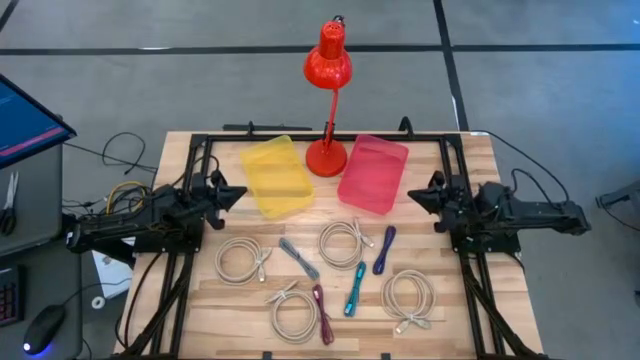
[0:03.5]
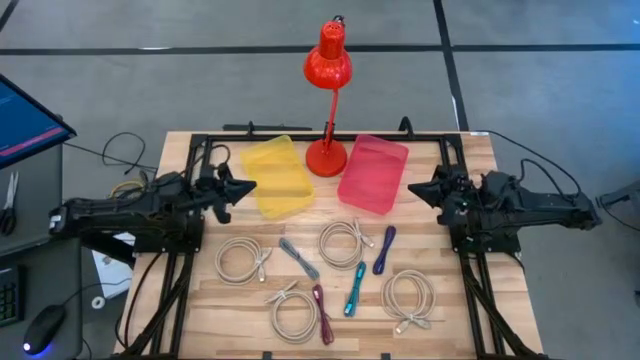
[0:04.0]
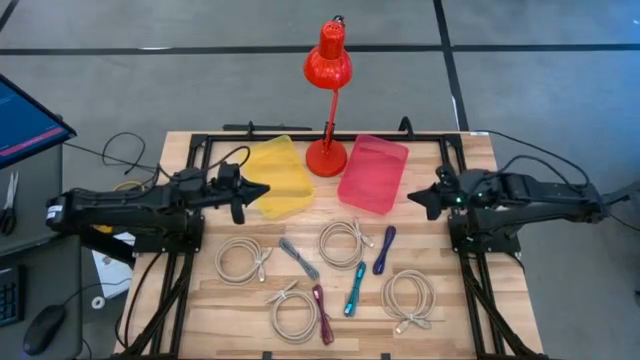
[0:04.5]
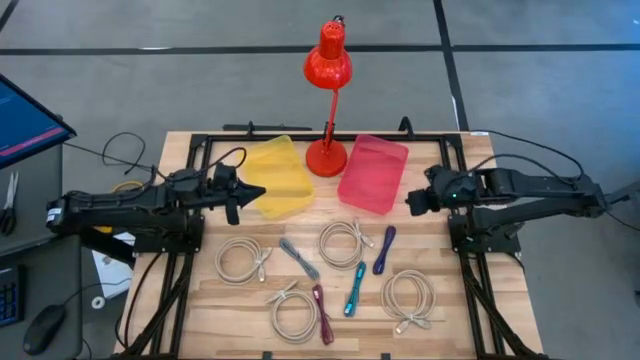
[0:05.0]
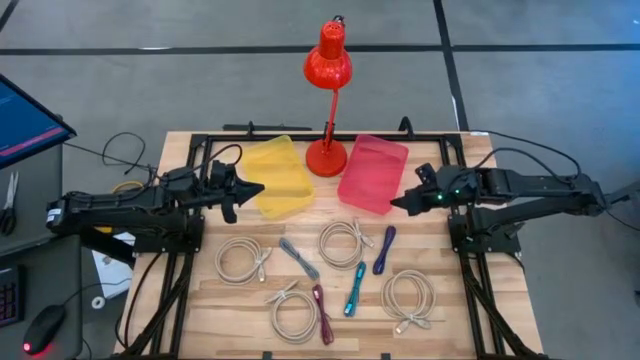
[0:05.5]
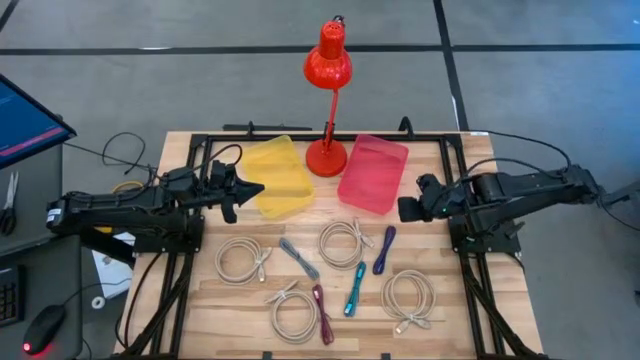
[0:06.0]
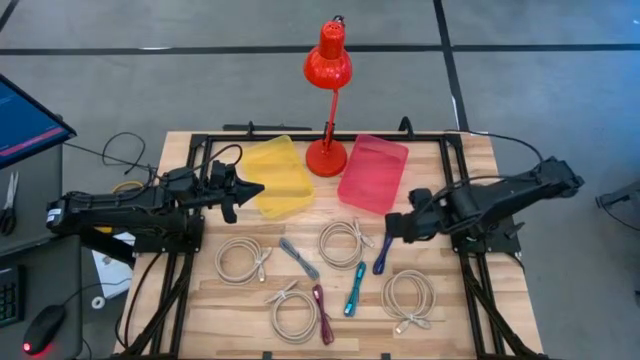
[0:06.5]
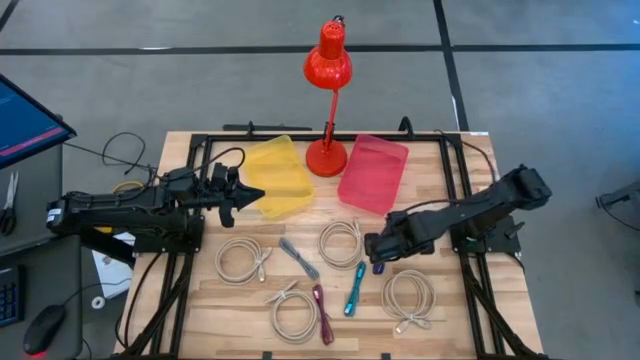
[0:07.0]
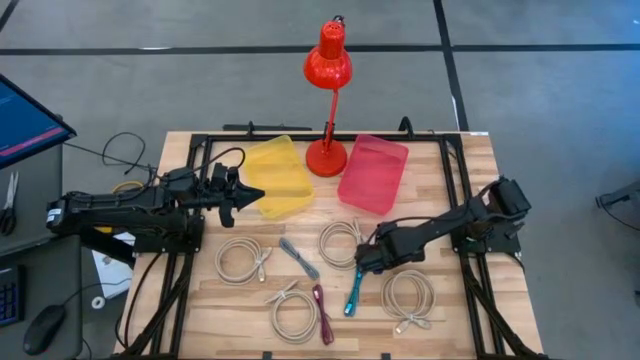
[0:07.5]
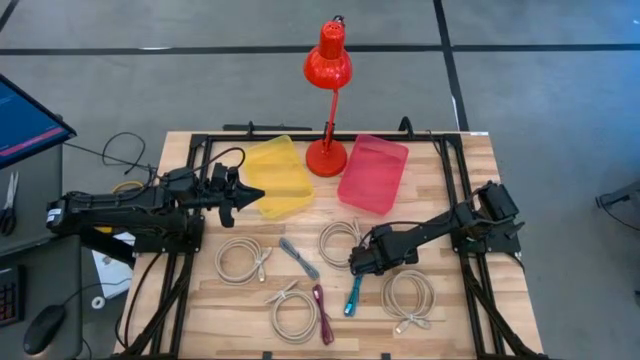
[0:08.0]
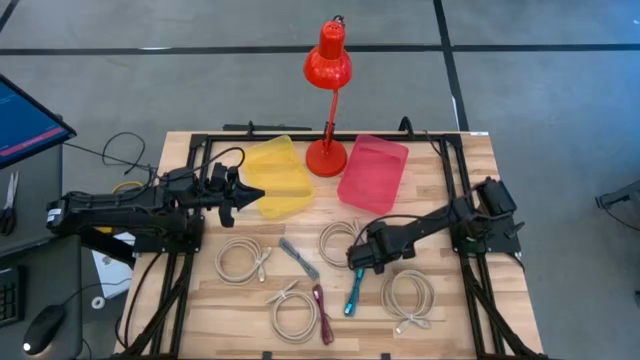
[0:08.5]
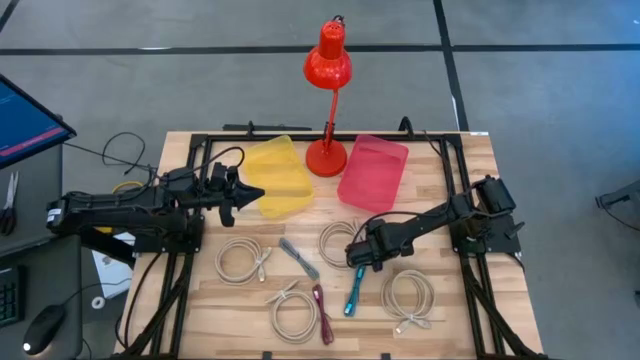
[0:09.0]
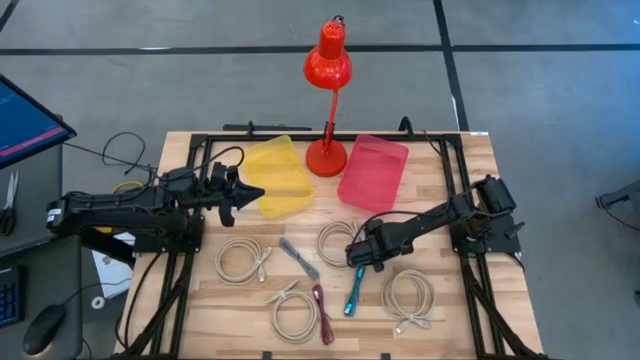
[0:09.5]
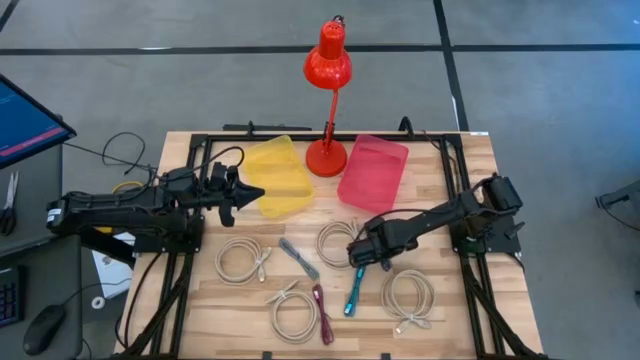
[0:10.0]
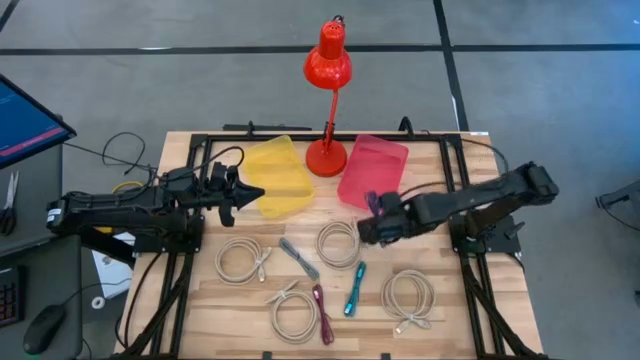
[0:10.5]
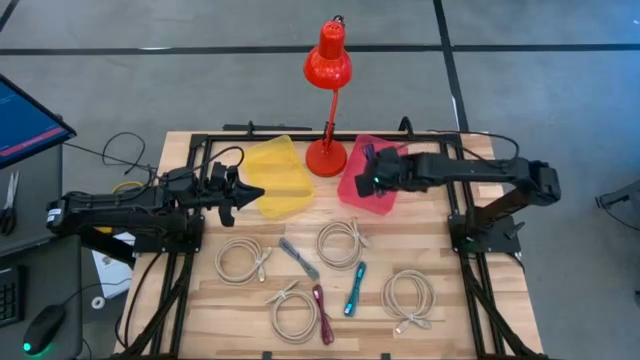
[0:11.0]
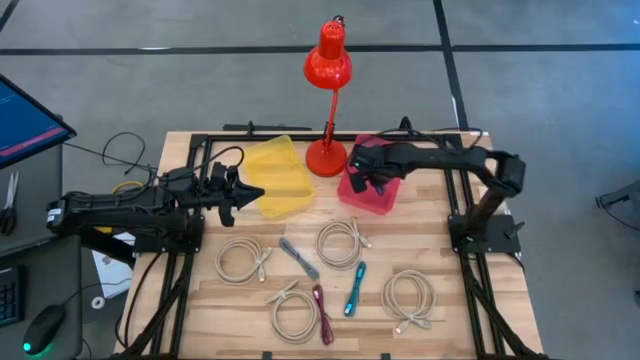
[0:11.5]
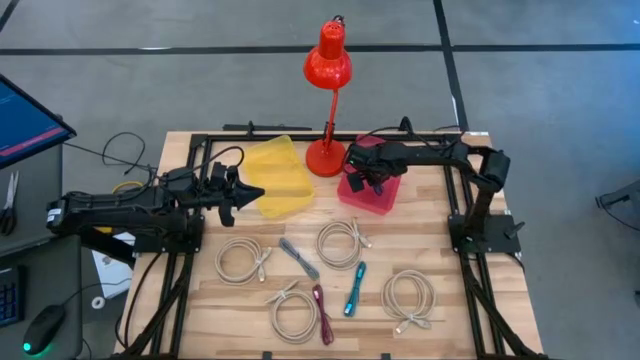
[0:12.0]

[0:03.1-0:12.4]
Task: Pick & Place USB Port
Put the black and violet charger cable into the pink bin

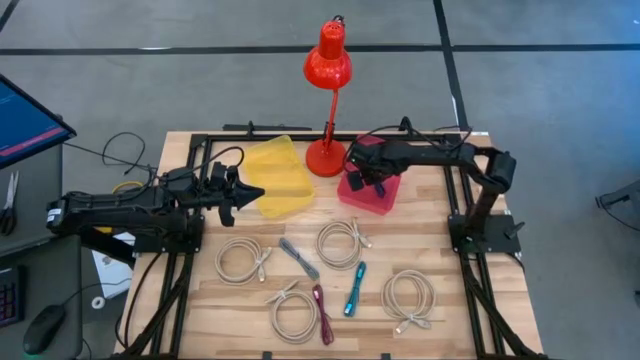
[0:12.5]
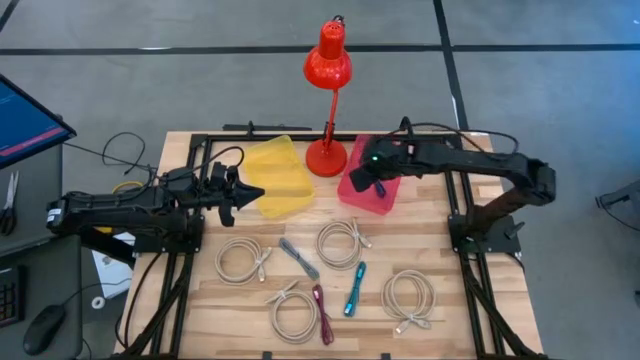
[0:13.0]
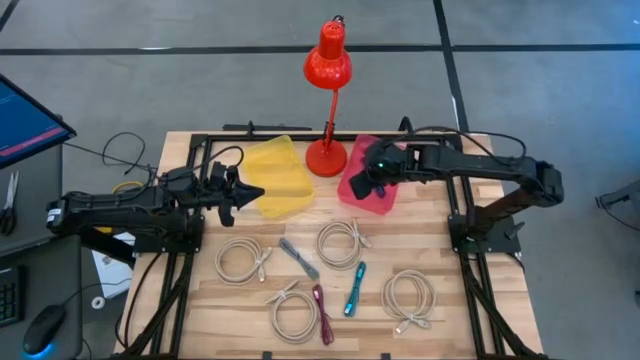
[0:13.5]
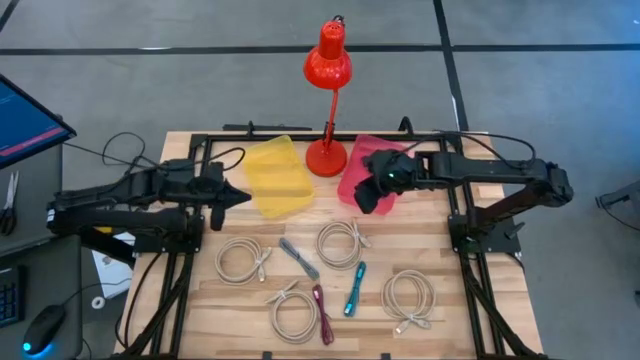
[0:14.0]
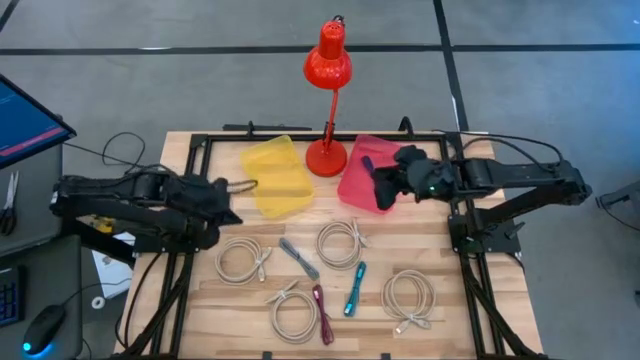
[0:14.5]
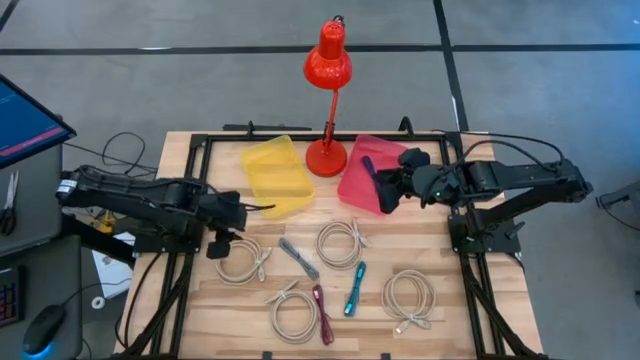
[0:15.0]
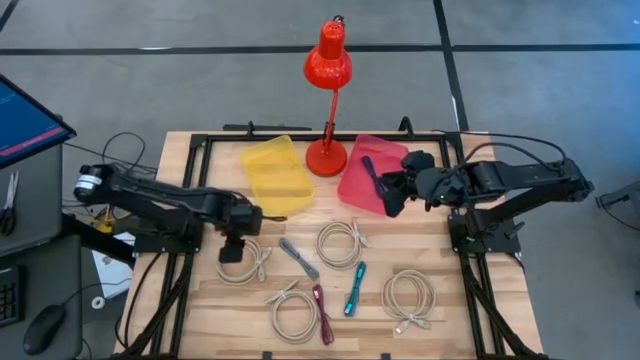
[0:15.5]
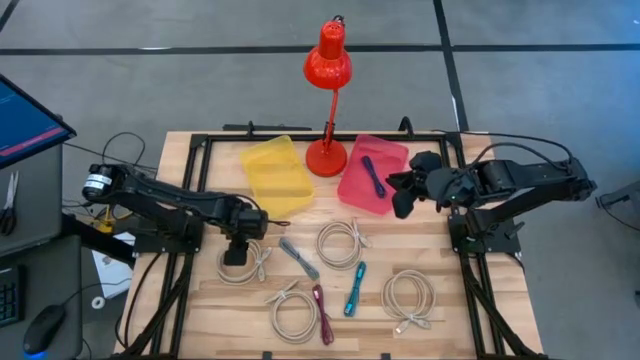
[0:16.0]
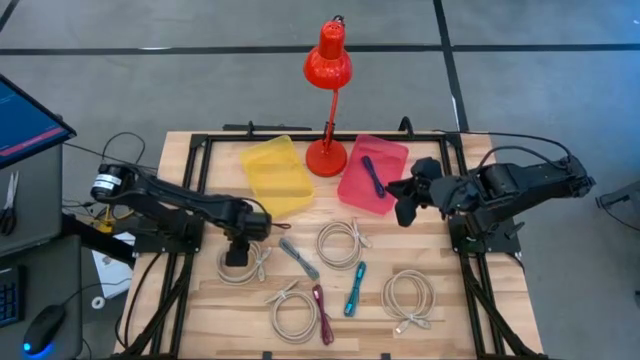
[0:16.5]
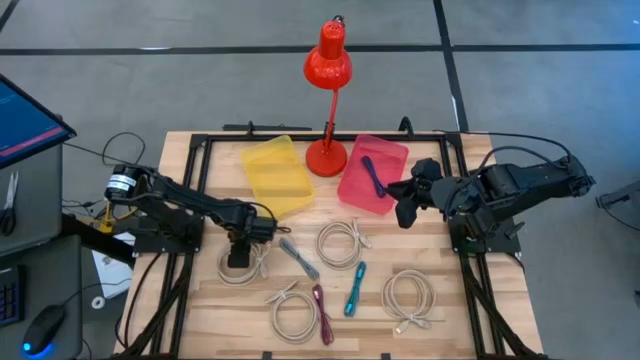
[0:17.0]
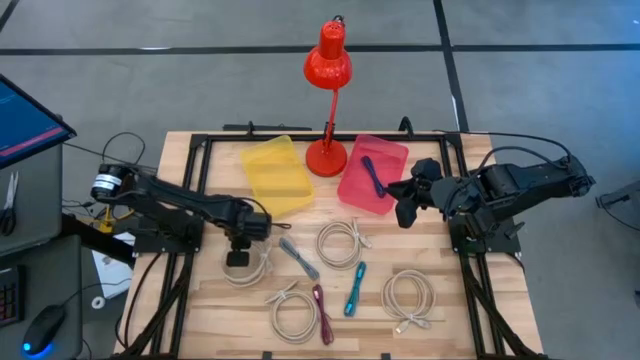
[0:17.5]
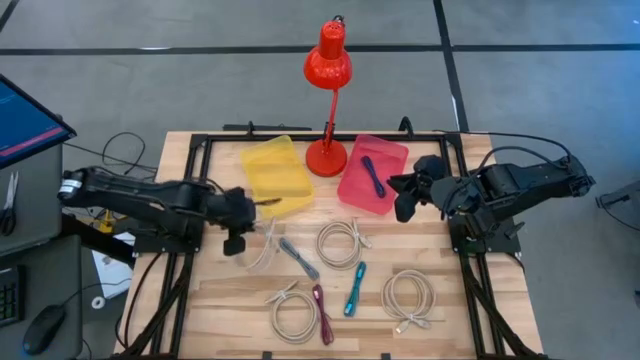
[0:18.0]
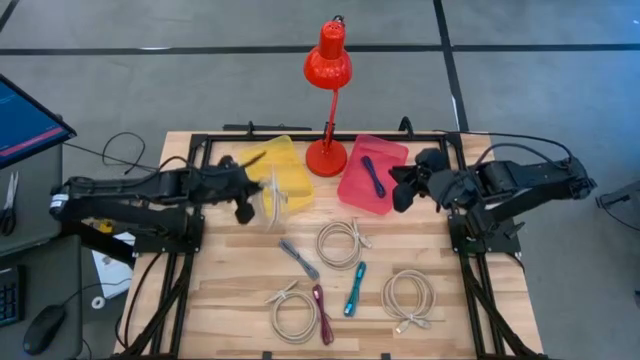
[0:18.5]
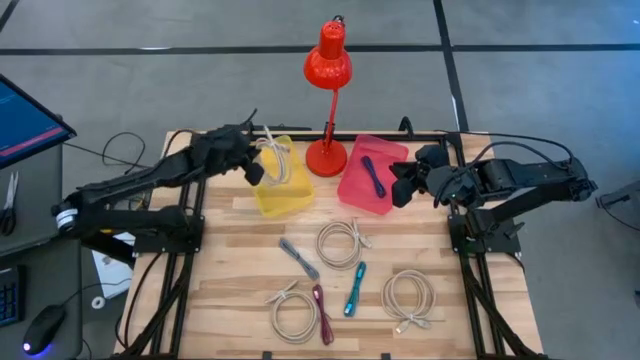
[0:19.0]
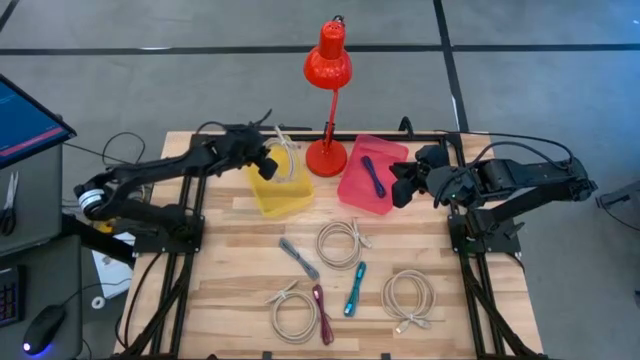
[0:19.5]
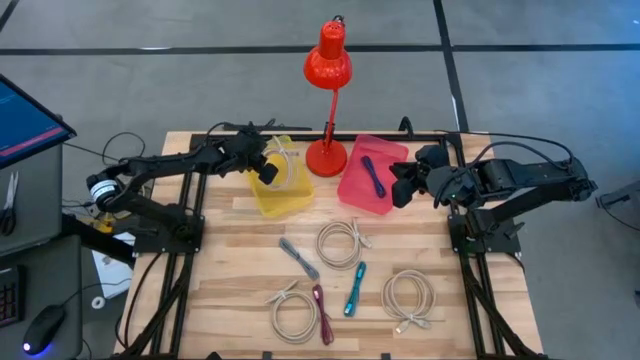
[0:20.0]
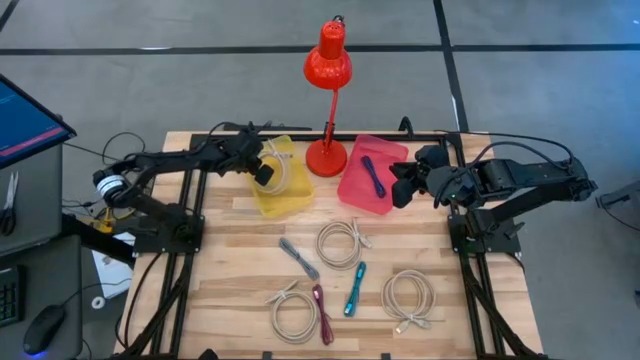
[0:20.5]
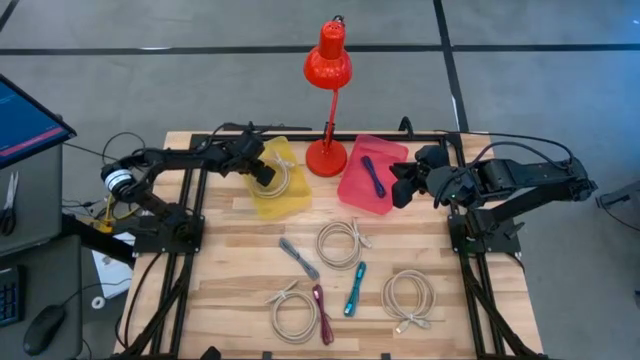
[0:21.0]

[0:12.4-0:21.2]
Put the light brown USB cable into the yellow bin

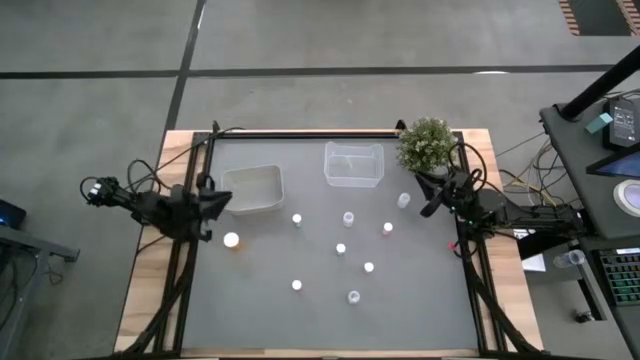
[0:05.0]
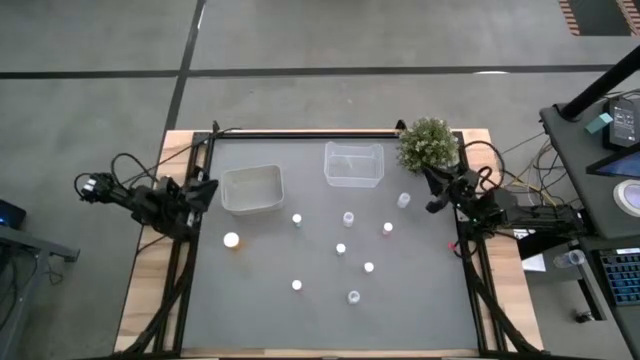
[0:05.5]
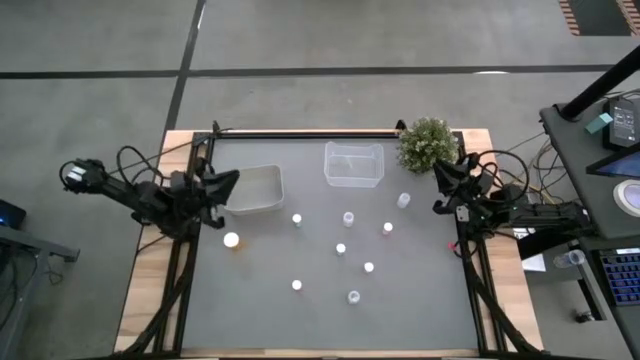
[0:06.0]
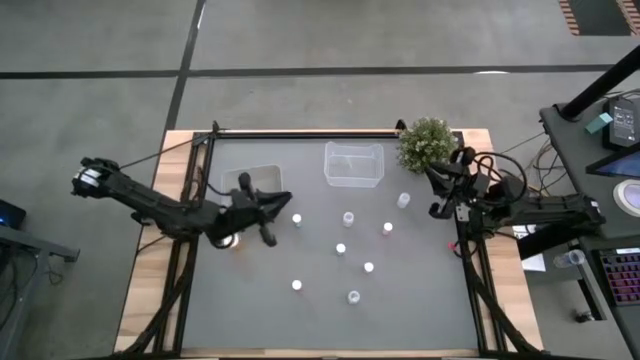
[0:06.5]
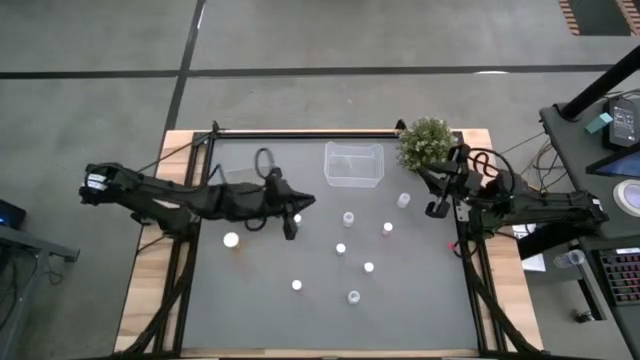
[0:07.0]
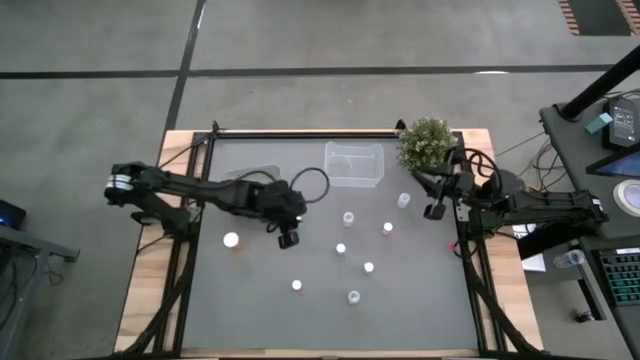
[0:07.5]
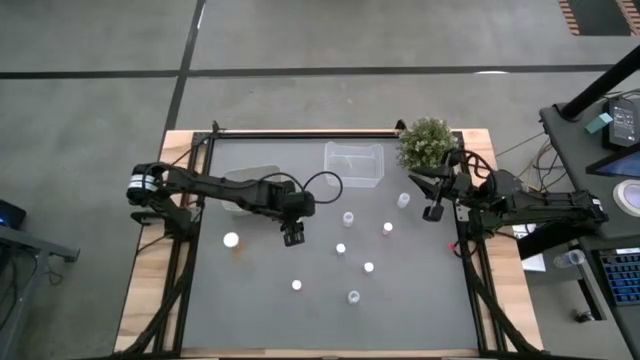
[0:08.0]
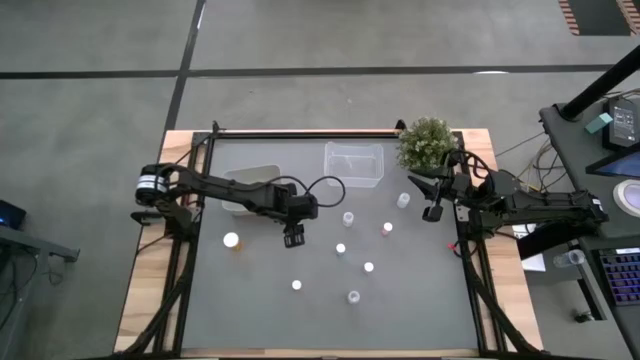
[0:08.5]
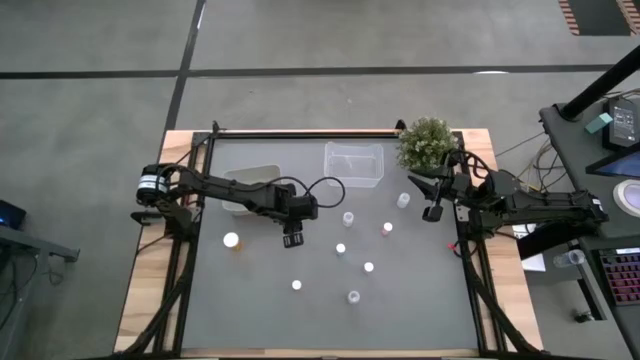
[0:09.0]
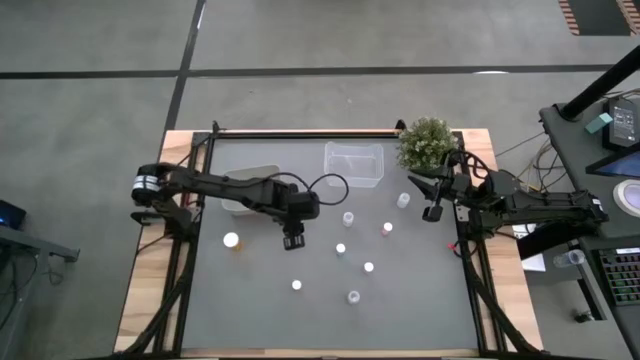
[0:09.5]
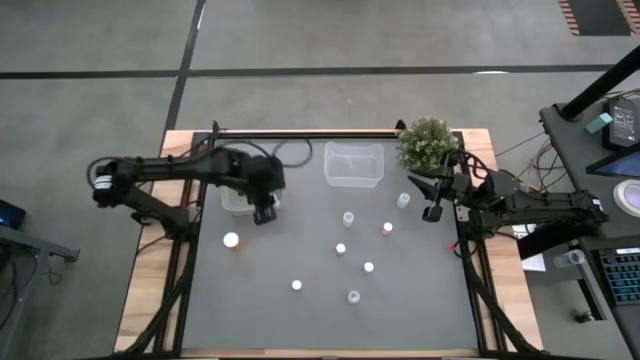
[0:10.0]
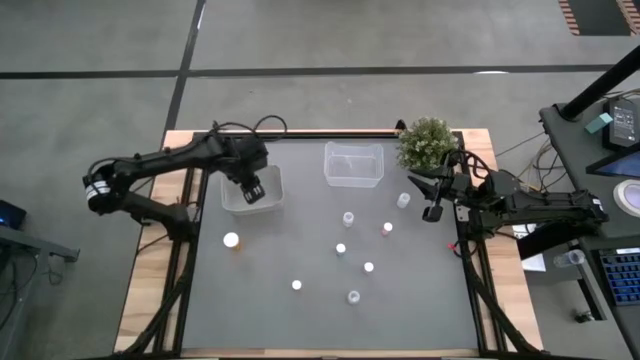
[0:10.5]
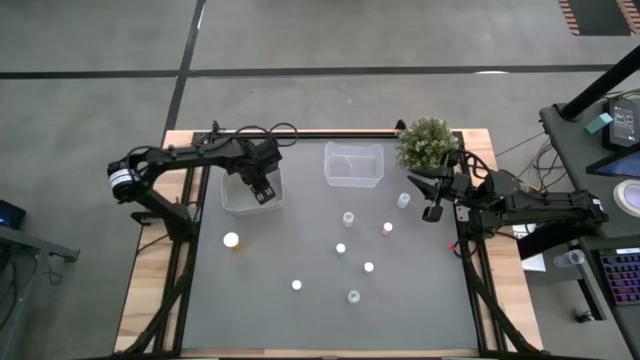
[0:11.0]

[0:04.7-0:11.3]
Task: Pick and place medicine bottles into bin by pill shape (circle, oval)
Put the top small blue pill bottle into the gray bin
